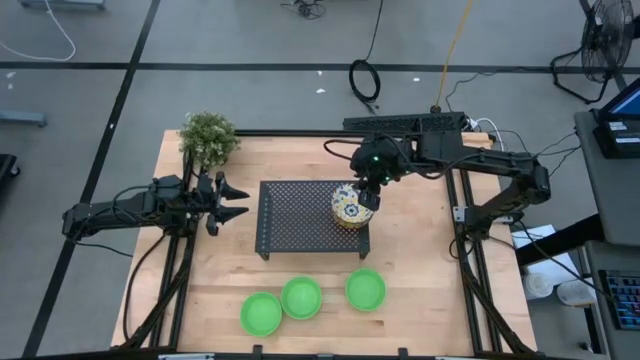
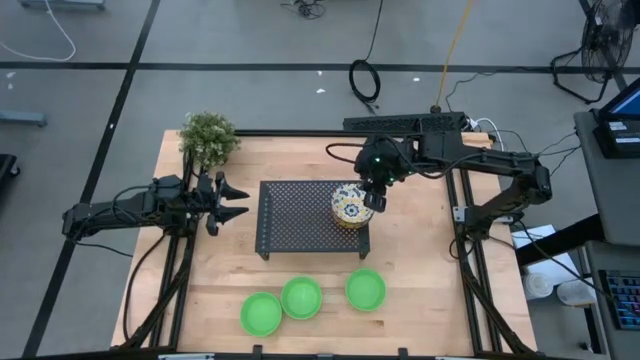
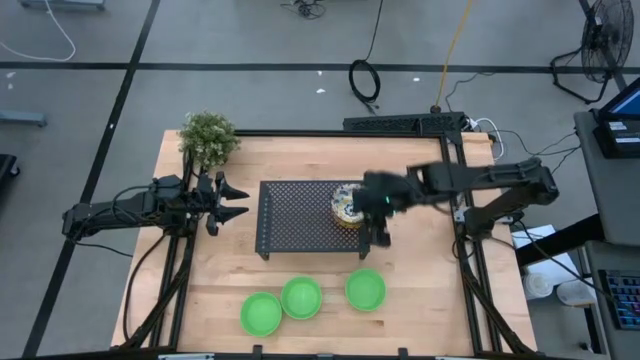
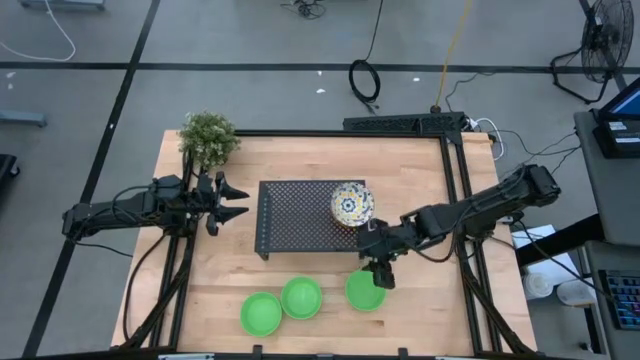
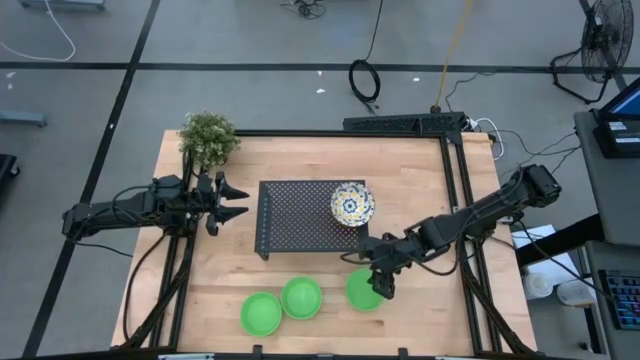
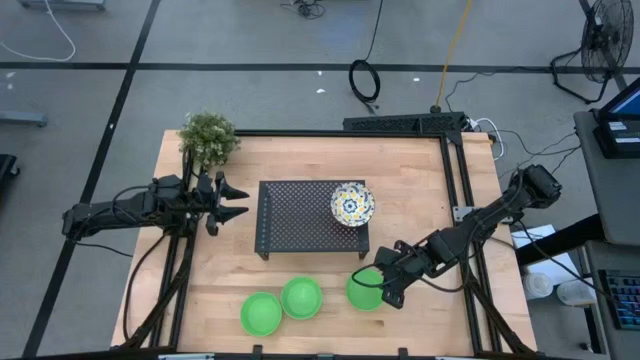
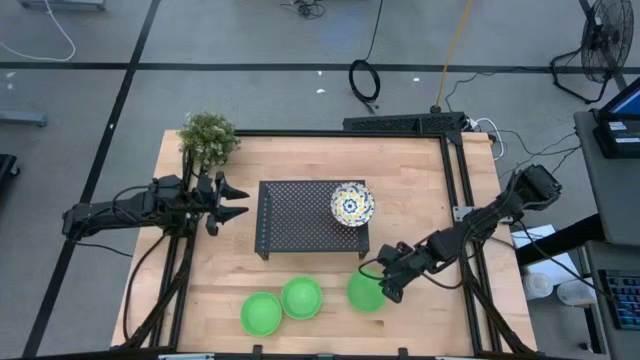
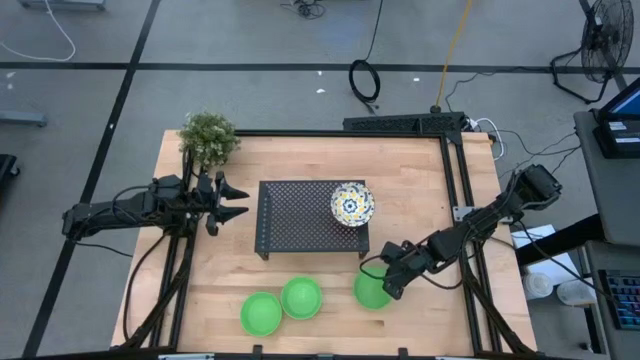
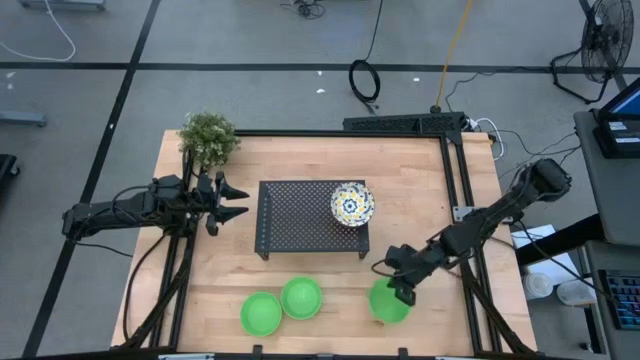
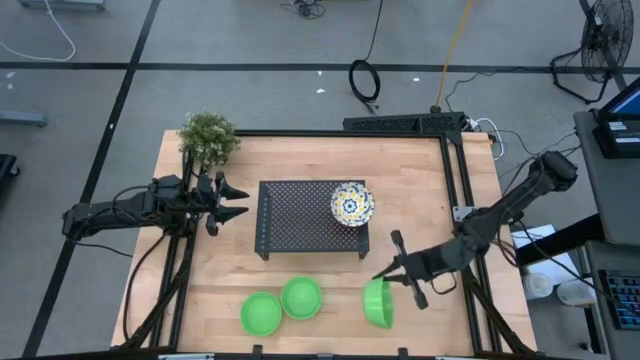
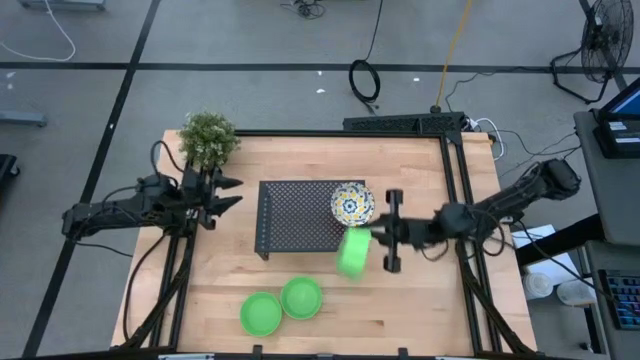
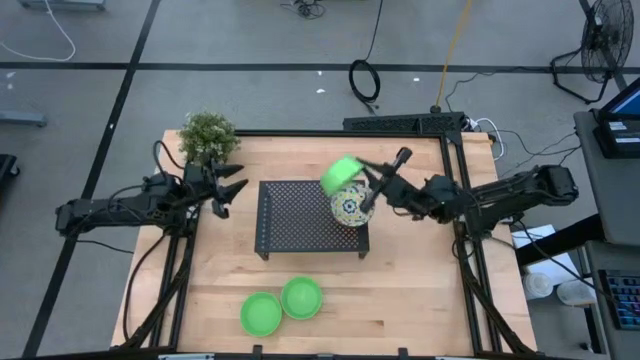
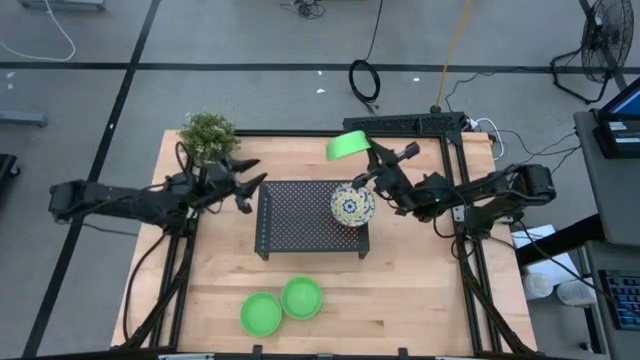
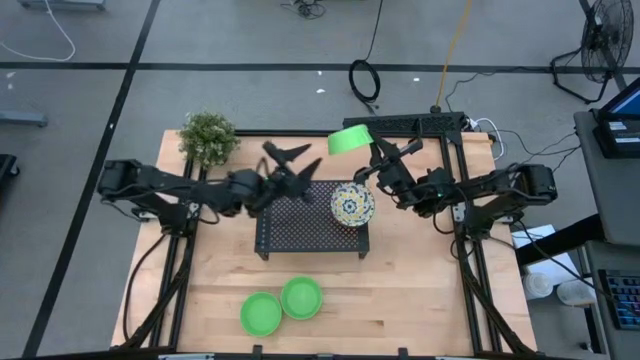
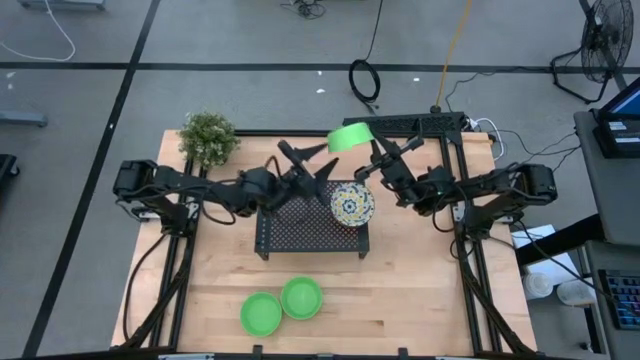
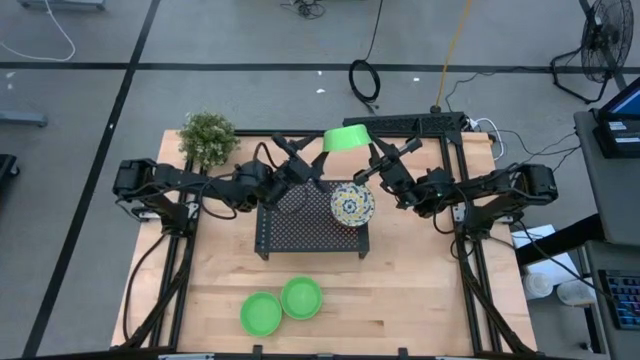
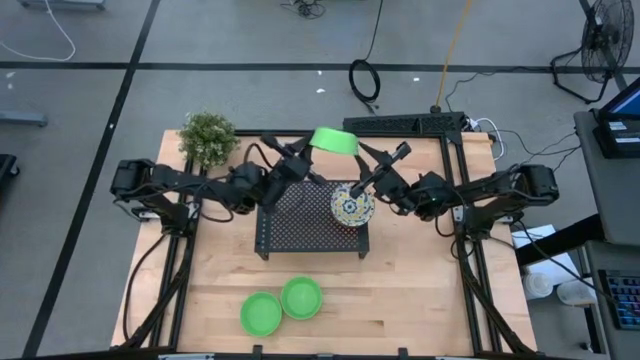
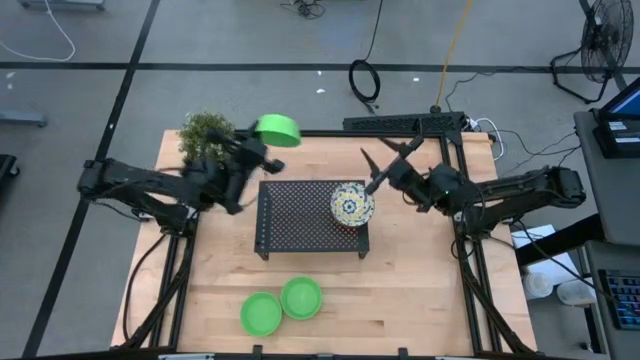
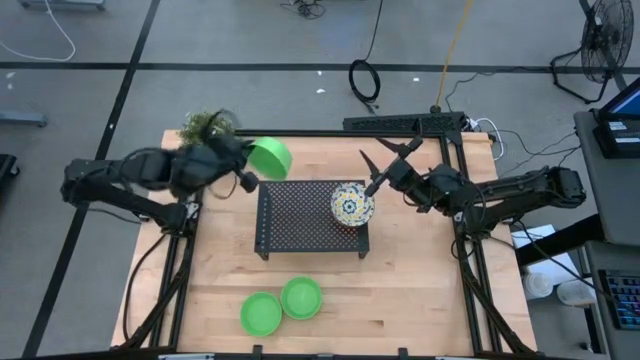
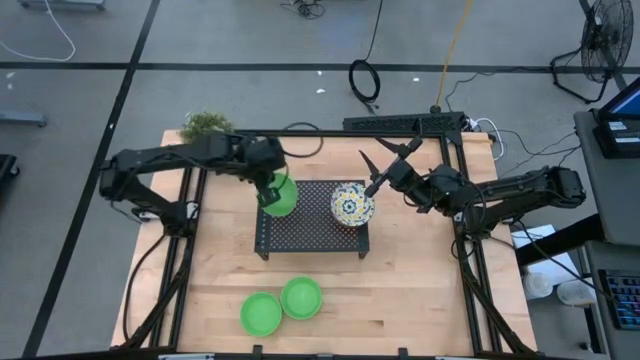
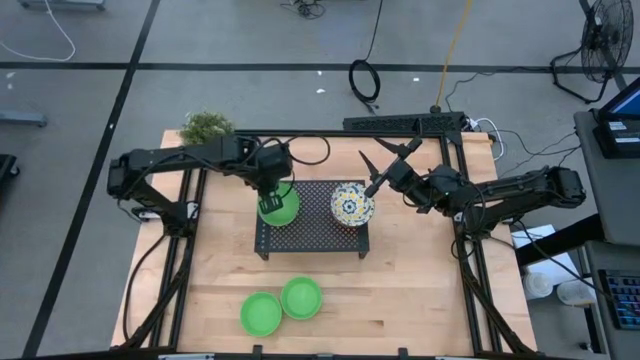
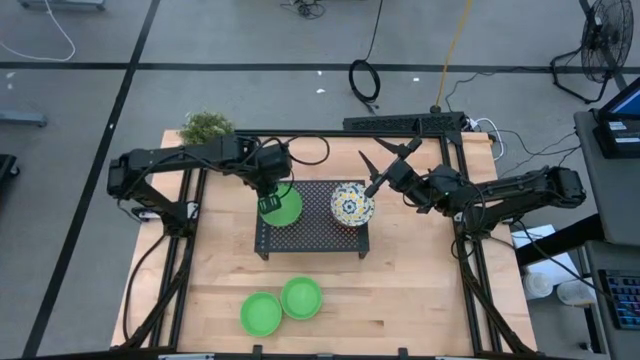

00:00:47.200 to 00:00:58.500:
Task: Pick & Place Mini bowls
Put the right green bowl on the shelf

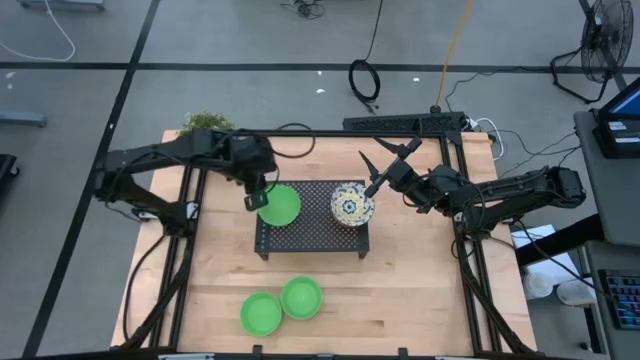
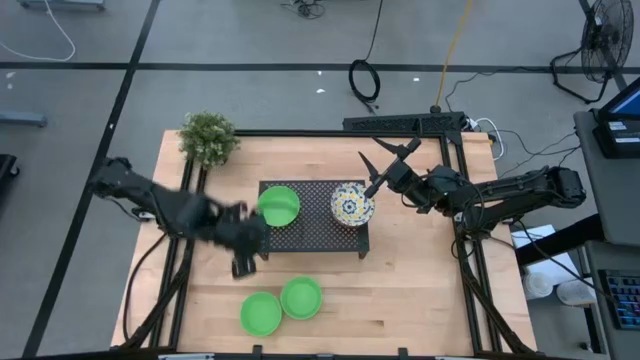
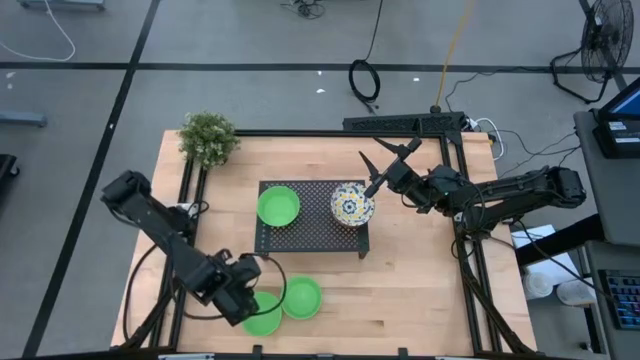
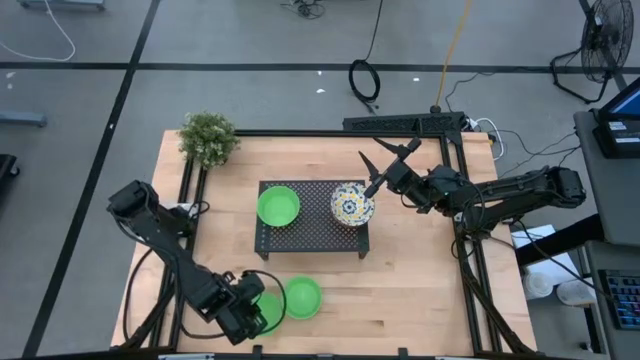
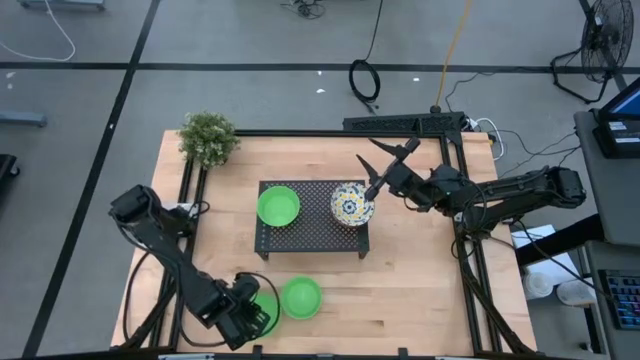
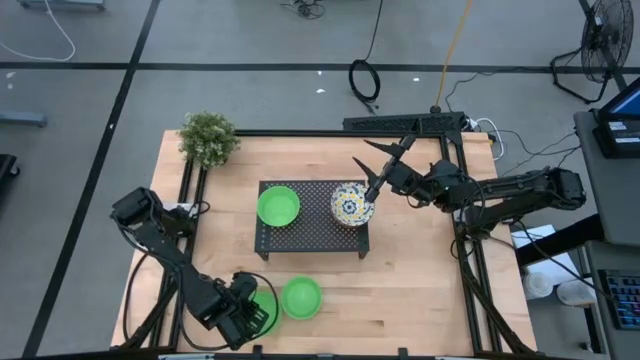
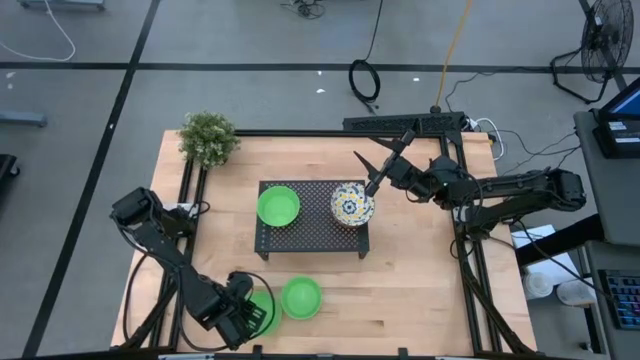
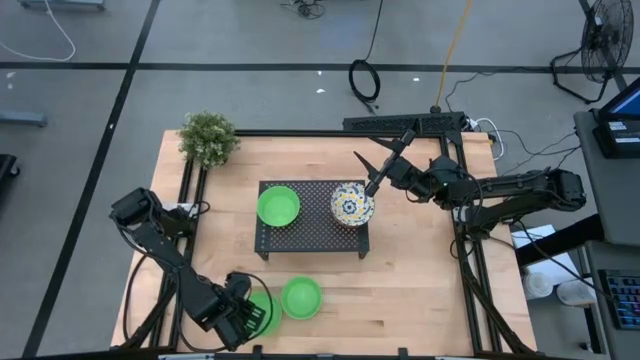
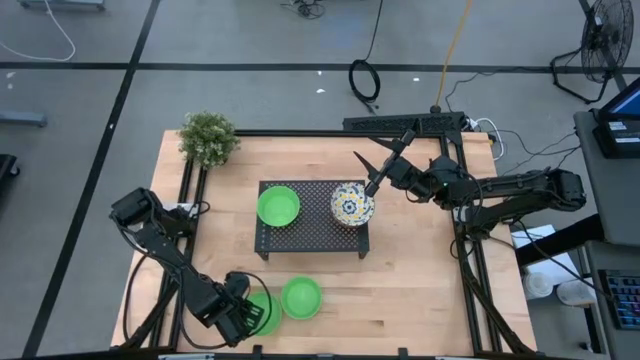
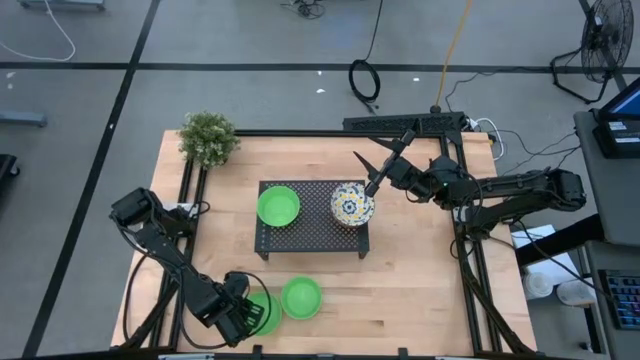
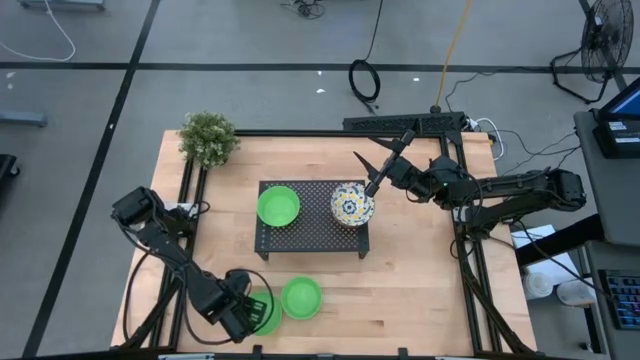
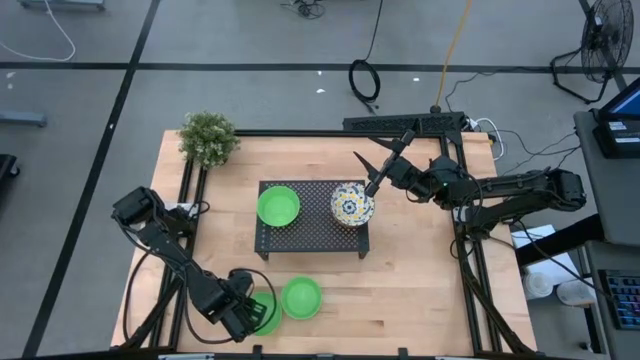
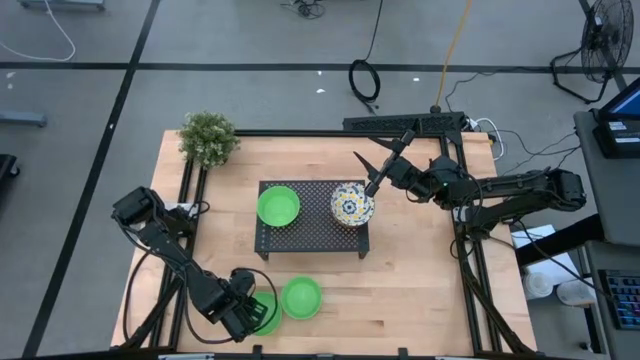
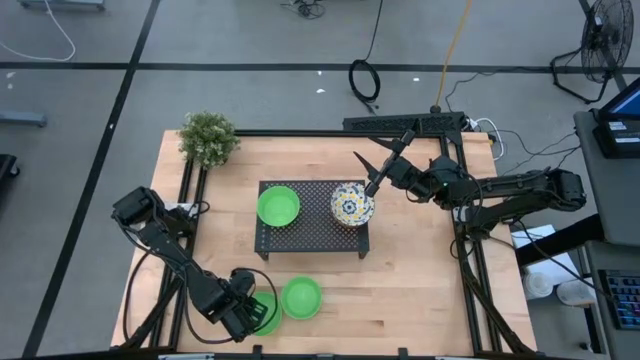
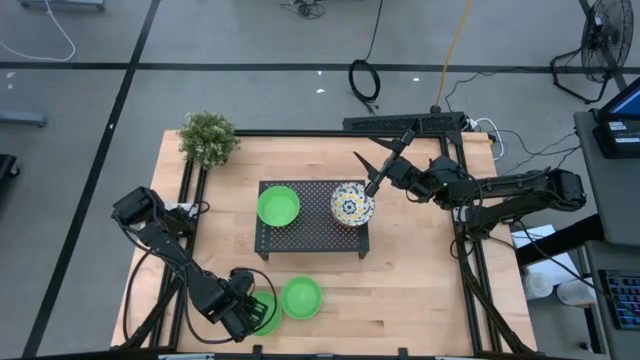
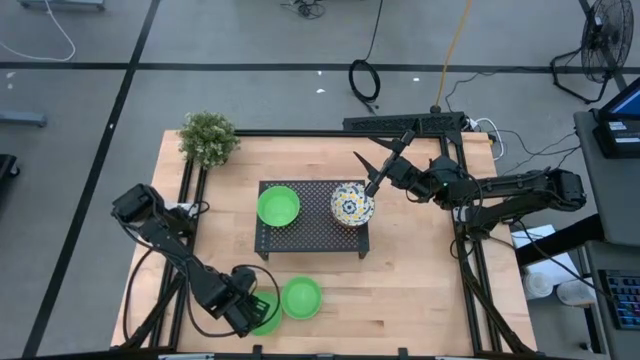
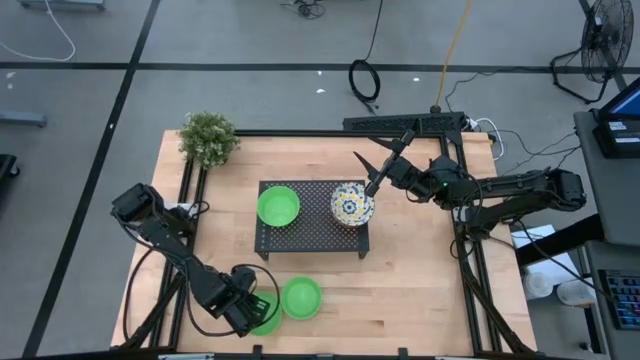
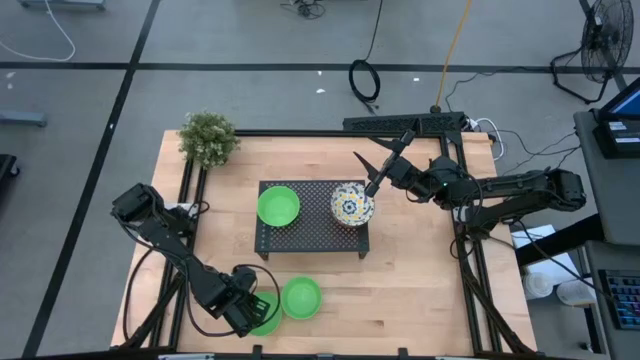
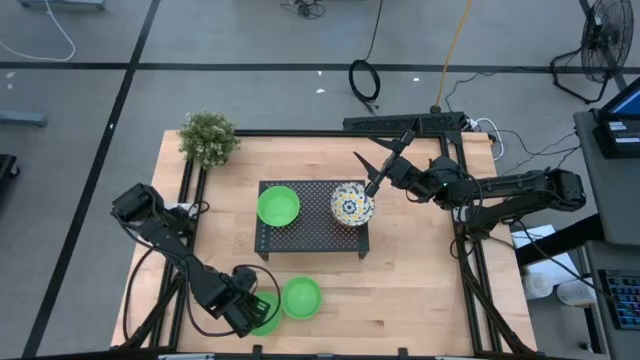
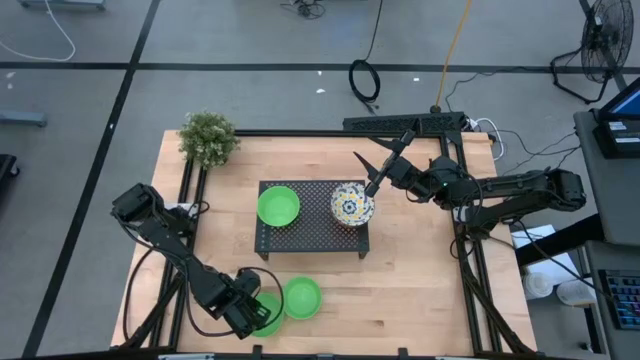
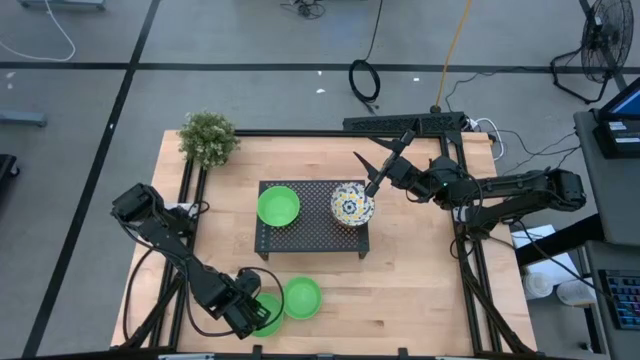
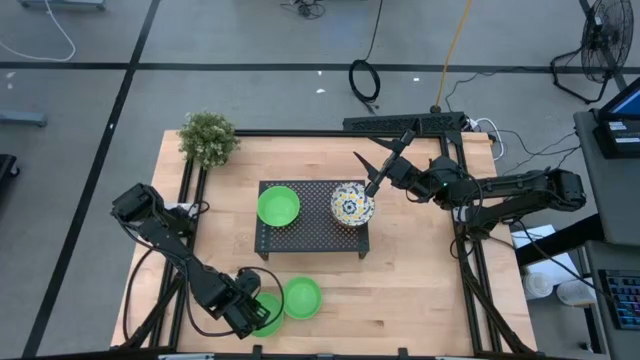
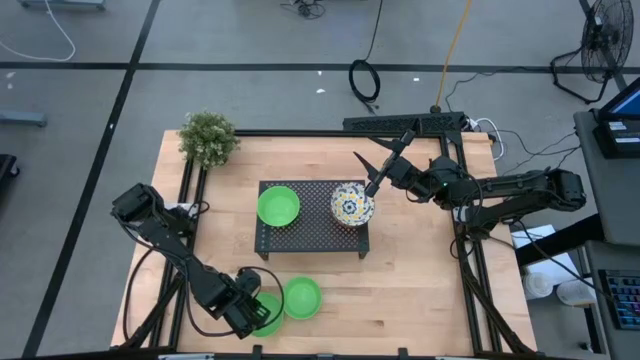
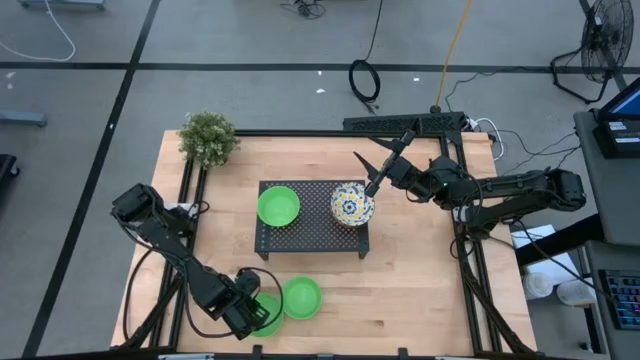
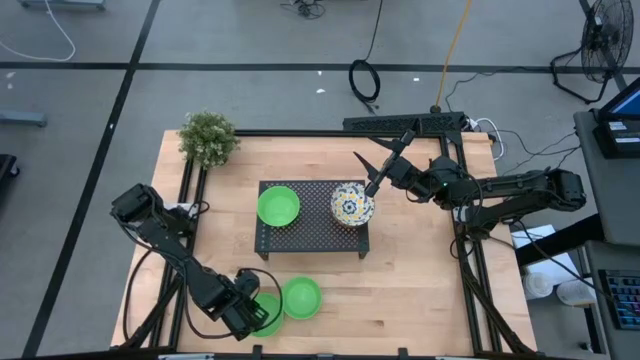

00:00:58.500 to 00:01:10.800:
Stack the left green bowl on top of the green bowl on the shelf
